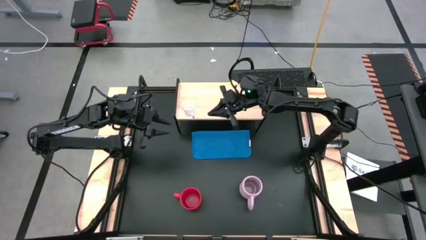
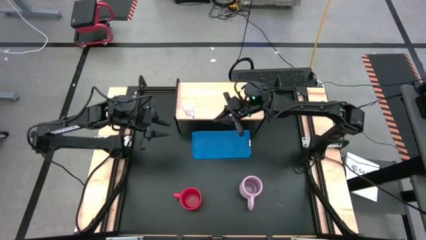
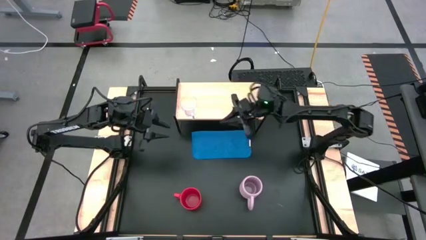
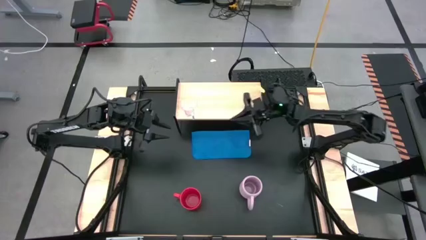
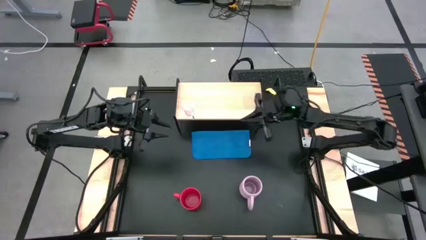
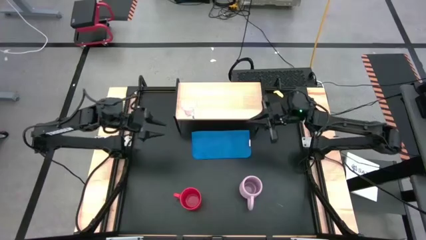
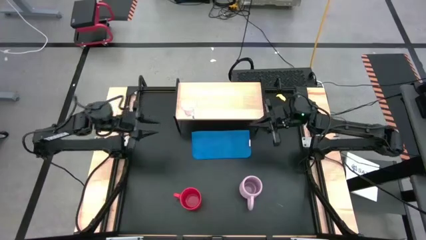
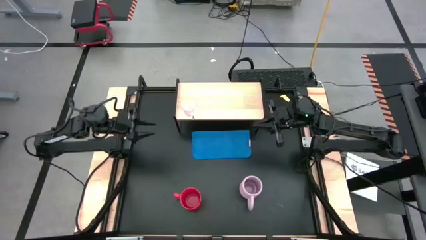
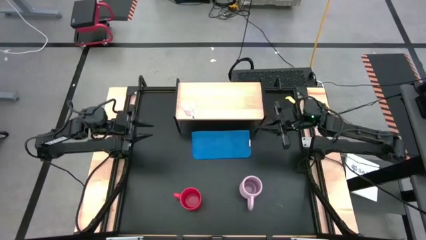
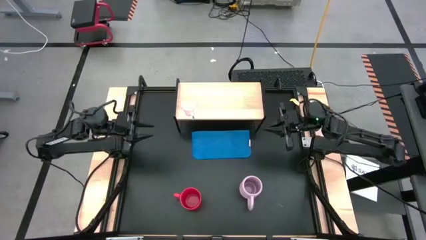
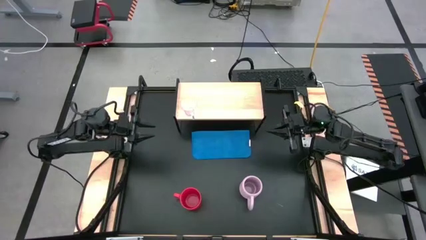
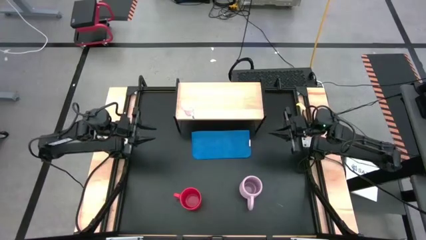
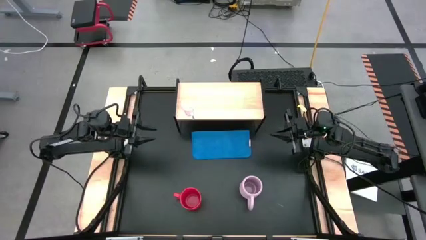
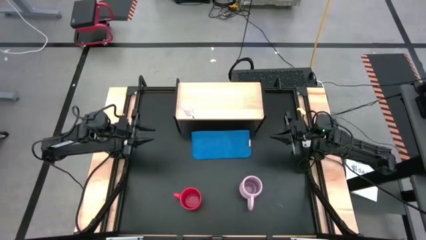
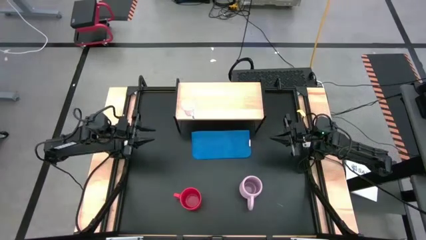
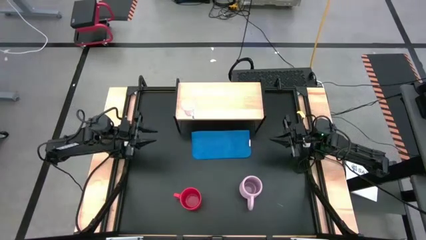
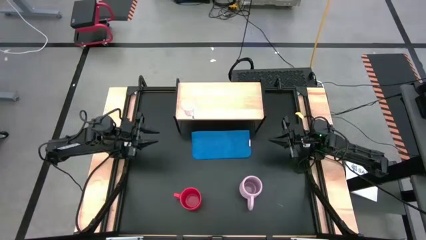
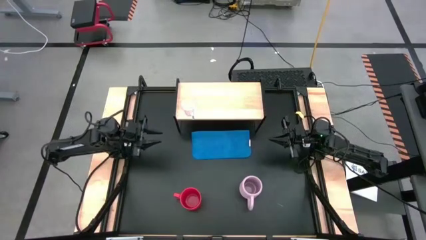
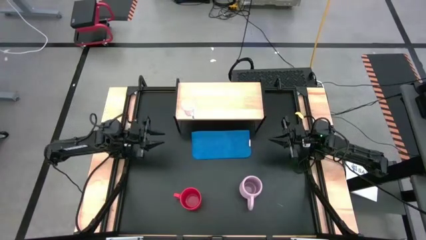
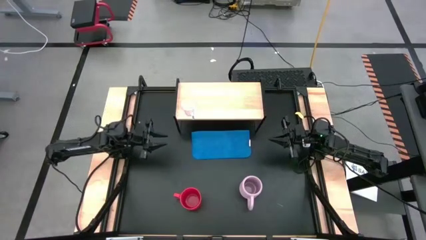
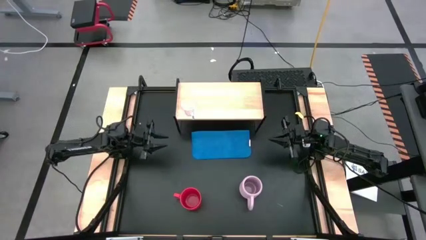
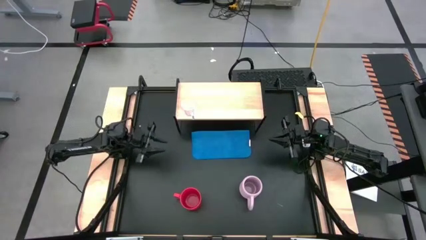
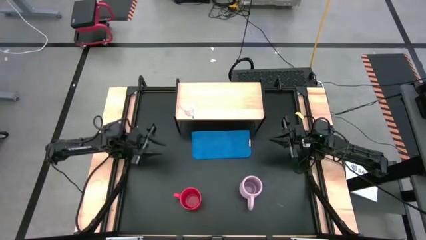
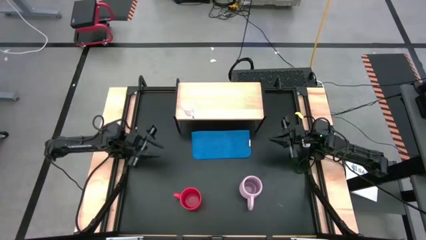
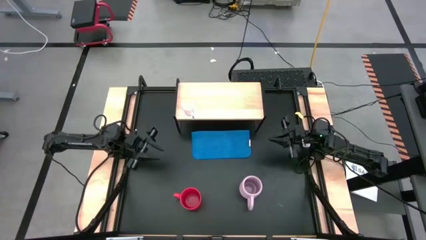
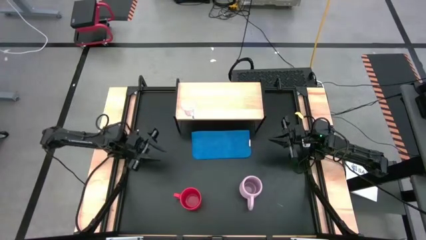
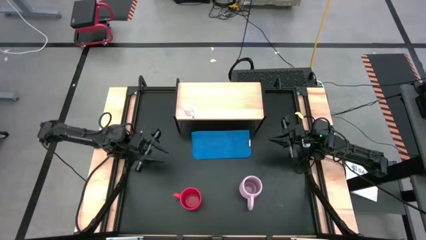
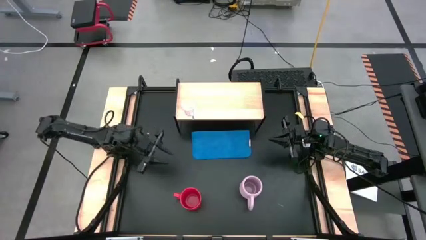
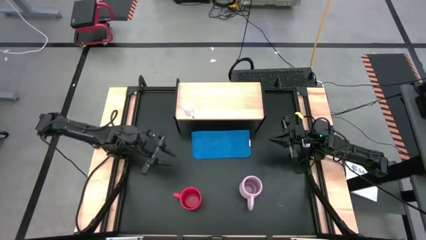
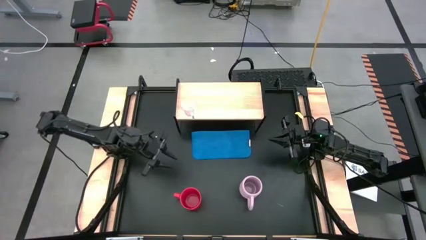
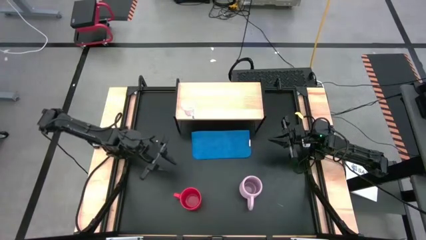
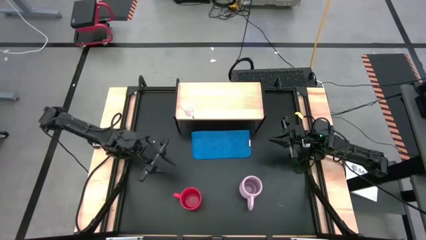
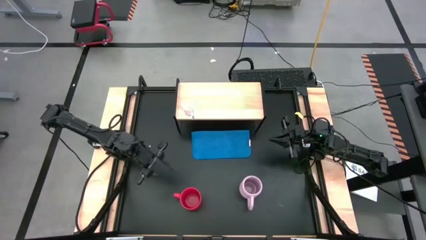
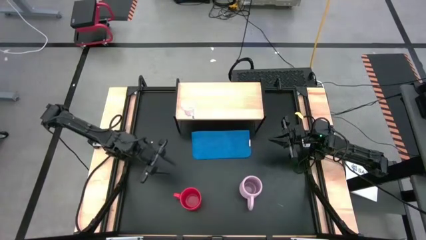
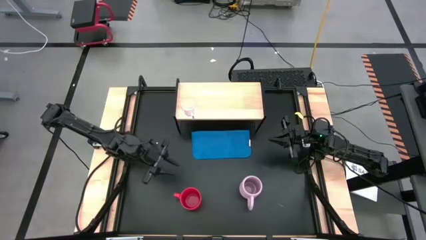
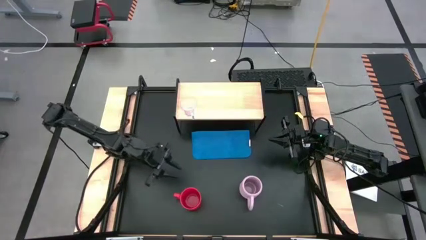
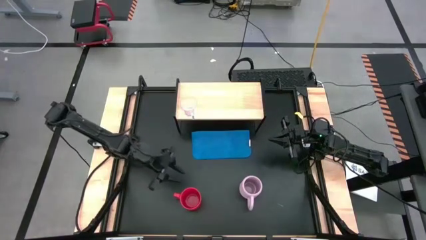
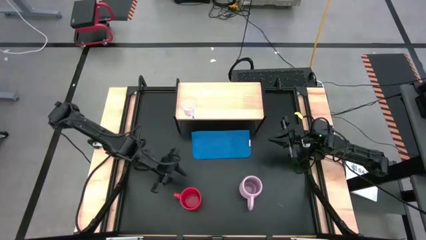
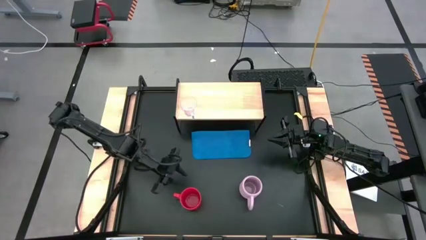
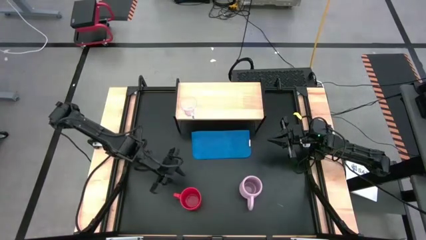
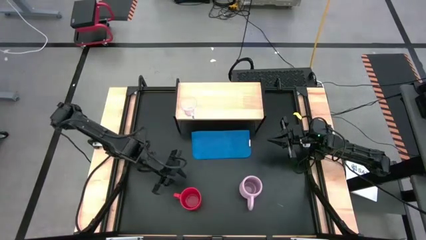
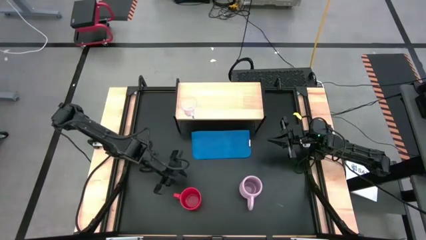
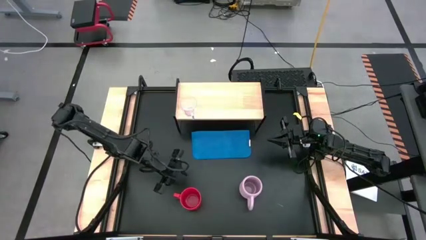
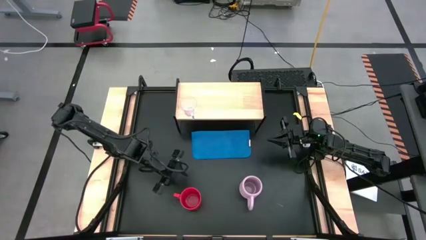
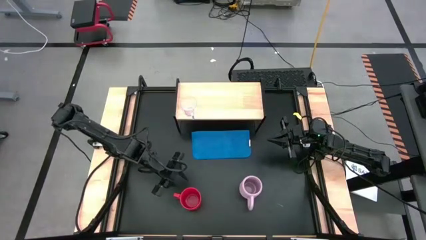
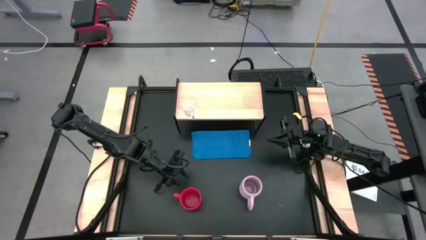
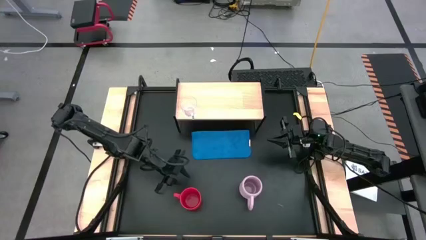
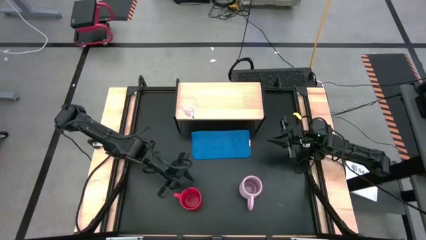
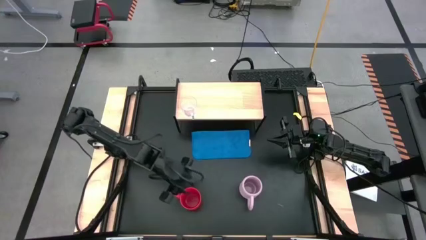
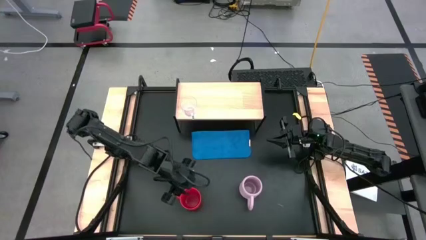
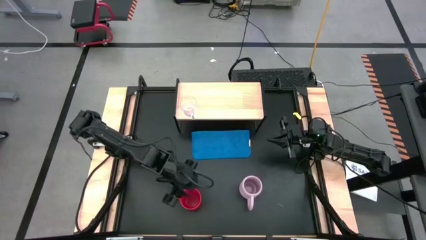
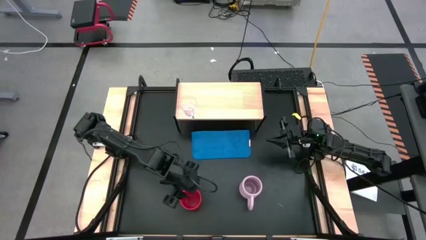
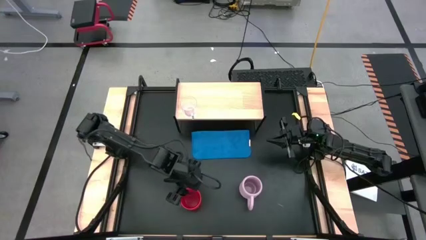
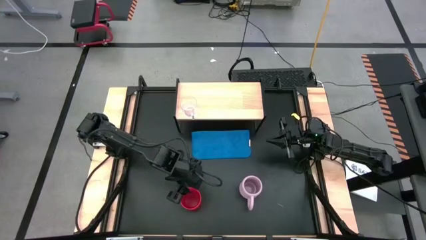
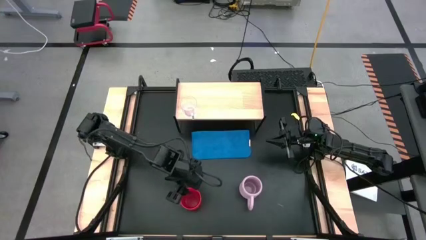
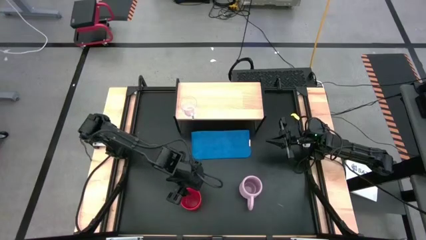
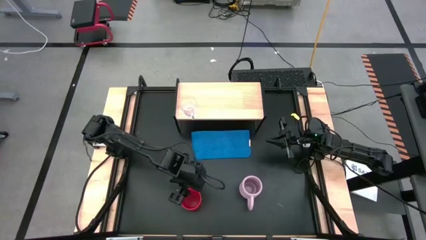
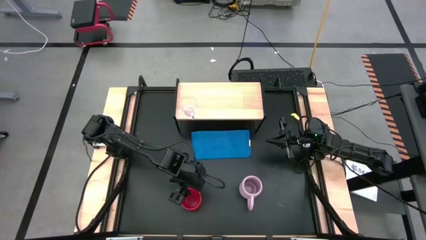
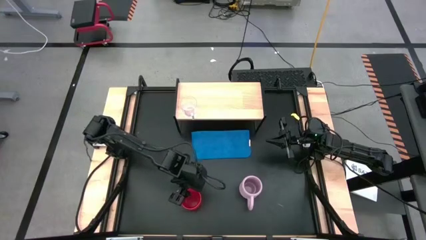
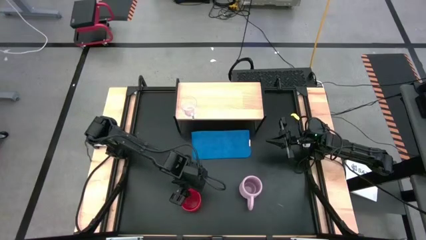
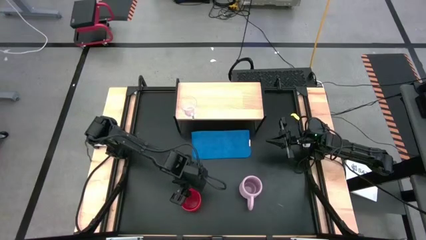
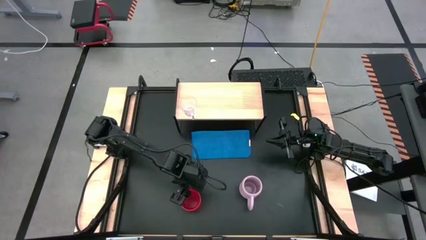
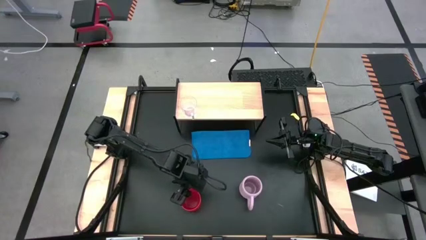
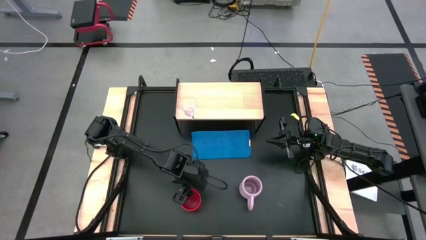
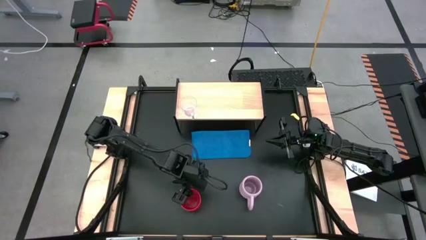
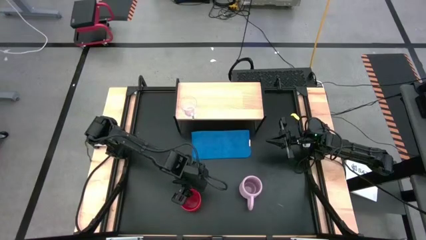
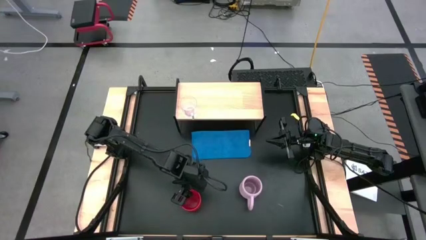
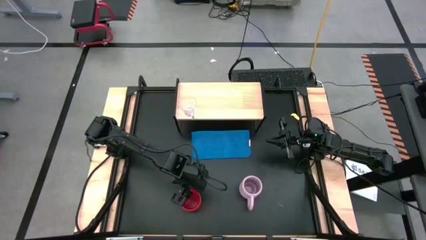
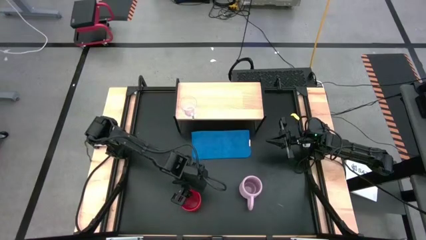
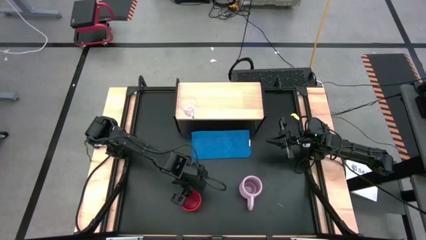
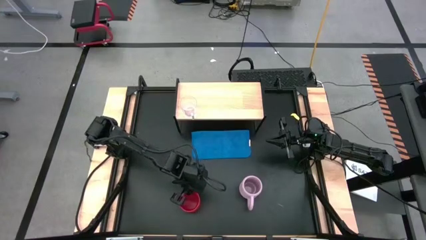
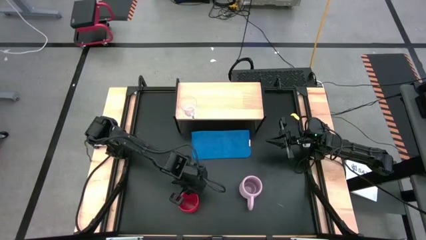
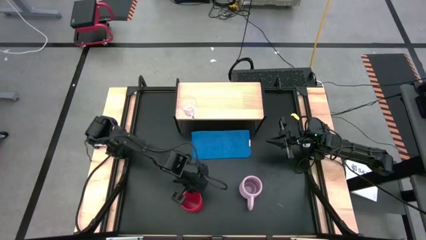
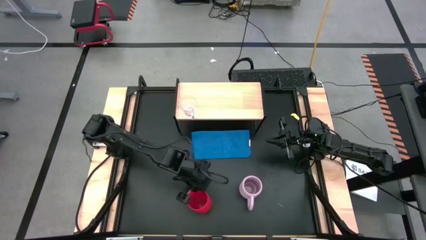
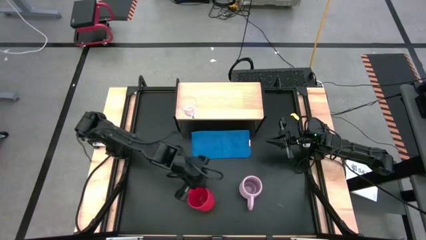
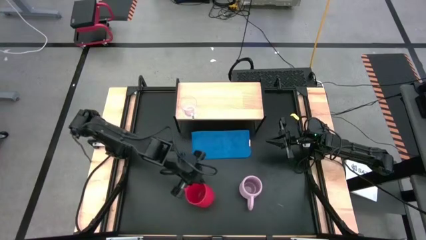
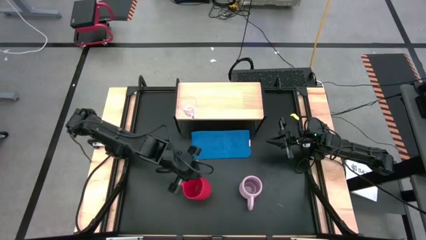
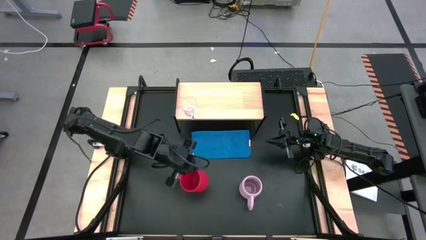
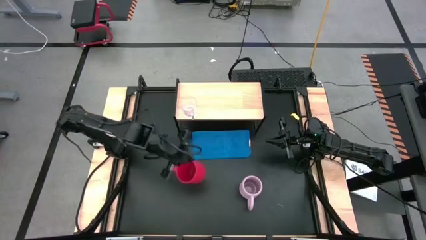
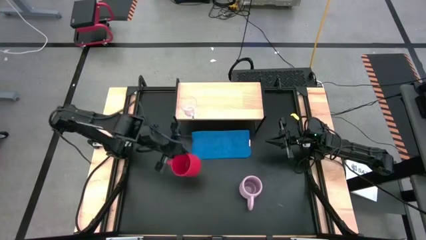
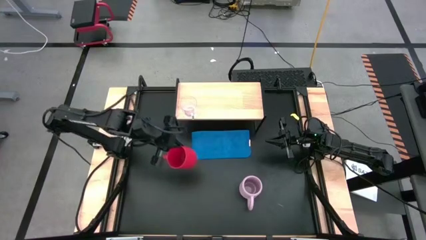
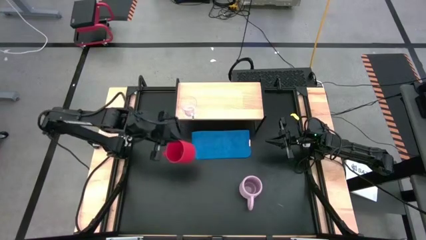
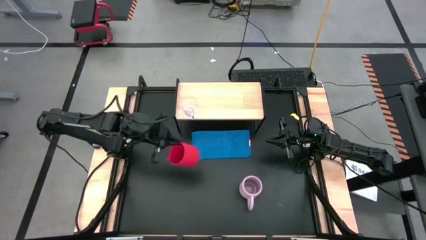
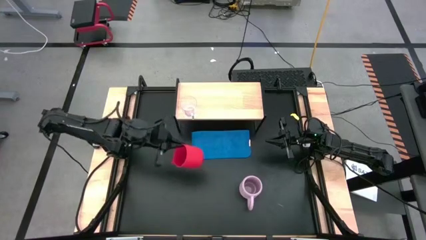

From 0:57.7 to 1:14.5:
Task: Stack small to large cups/mugs on shelf
Put the red mug on the shelf
